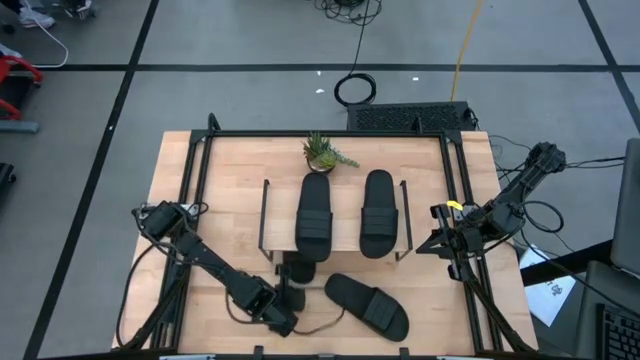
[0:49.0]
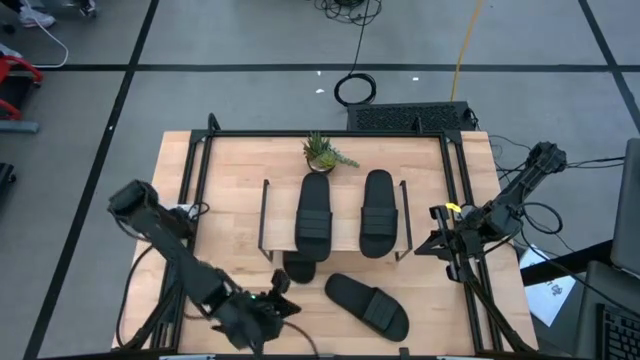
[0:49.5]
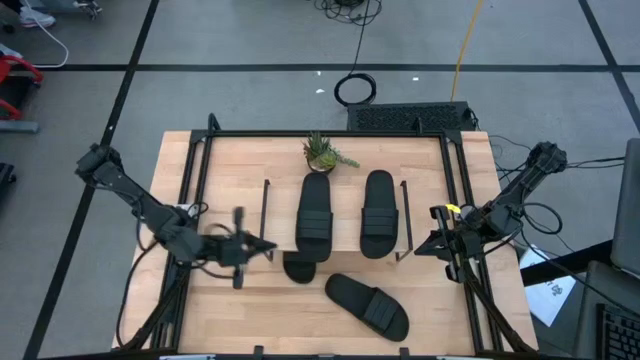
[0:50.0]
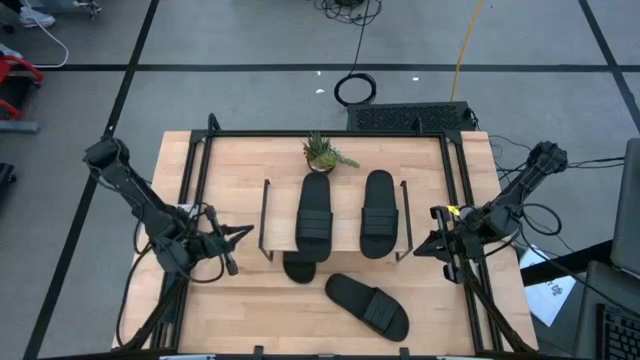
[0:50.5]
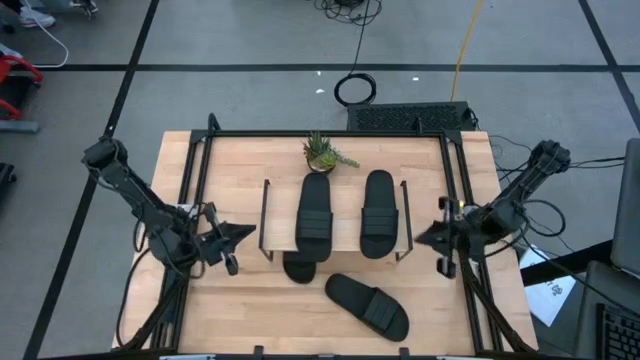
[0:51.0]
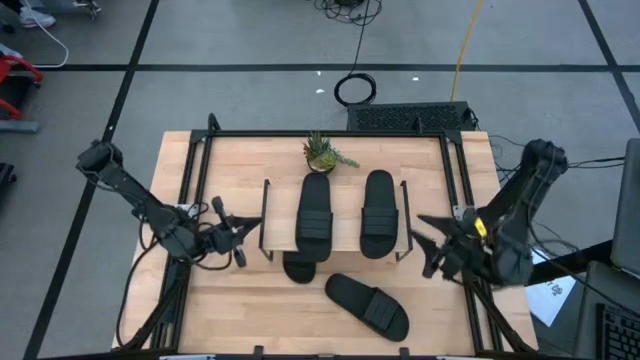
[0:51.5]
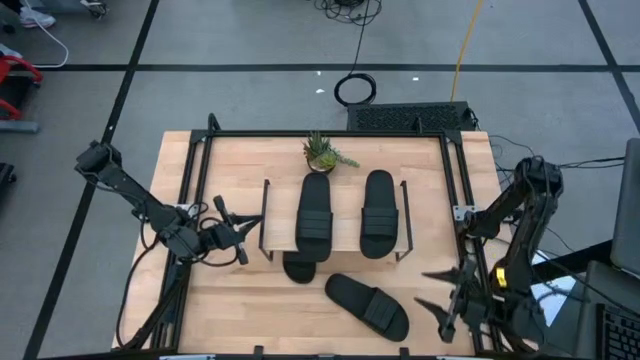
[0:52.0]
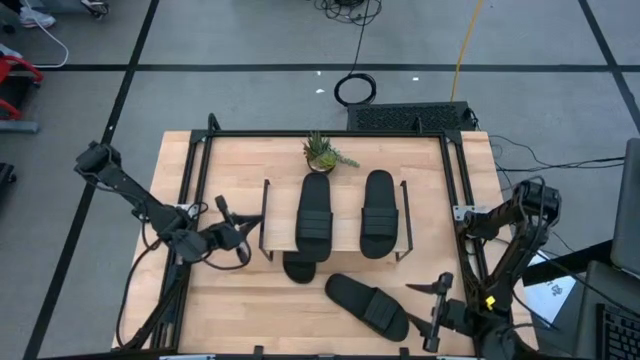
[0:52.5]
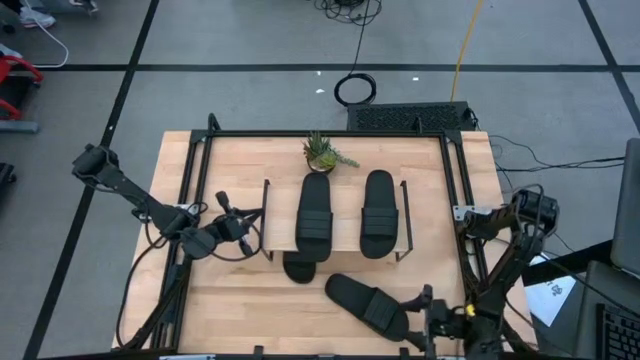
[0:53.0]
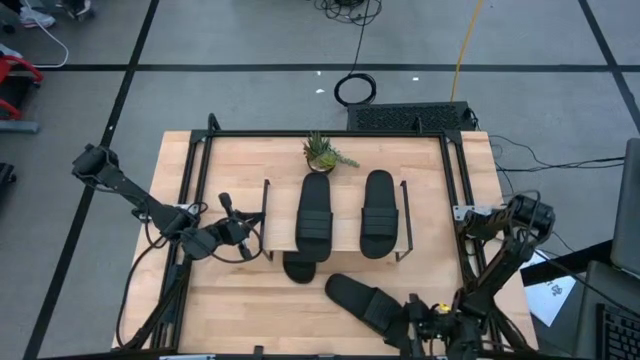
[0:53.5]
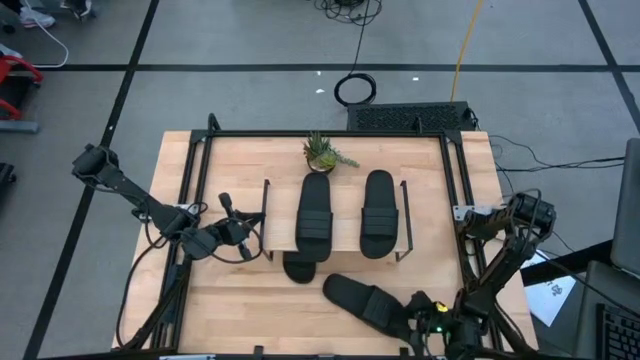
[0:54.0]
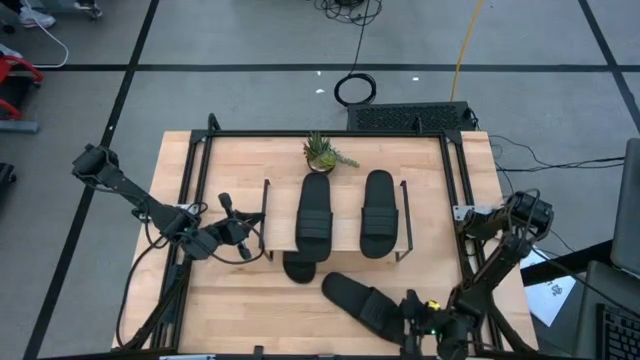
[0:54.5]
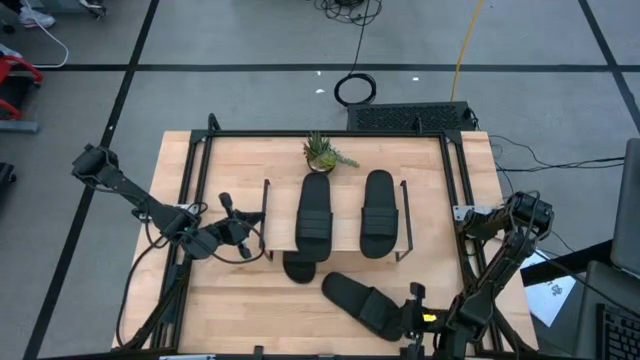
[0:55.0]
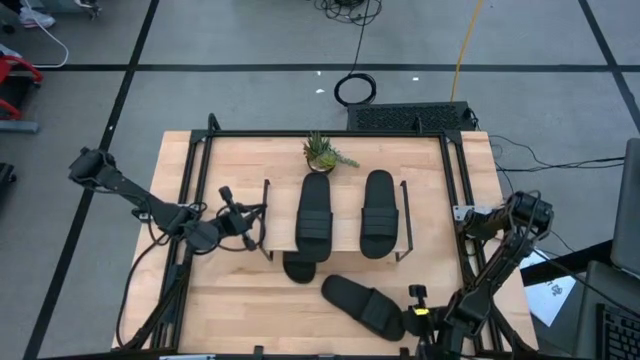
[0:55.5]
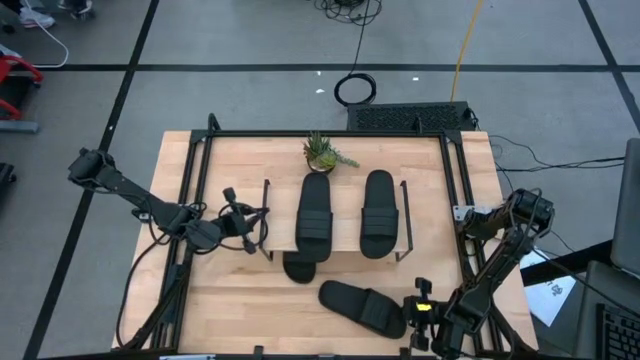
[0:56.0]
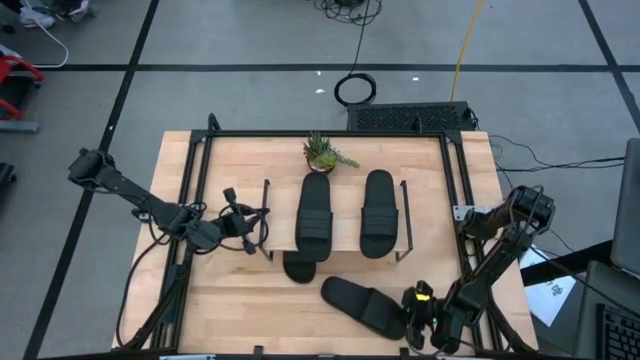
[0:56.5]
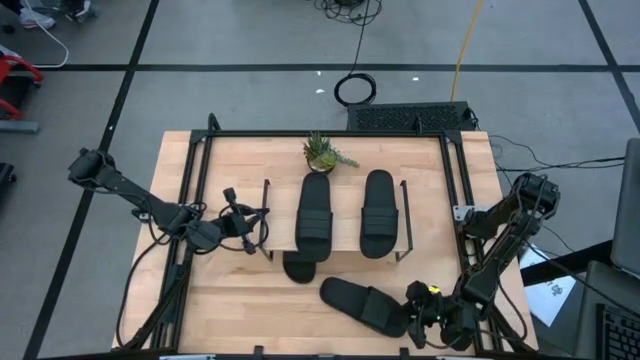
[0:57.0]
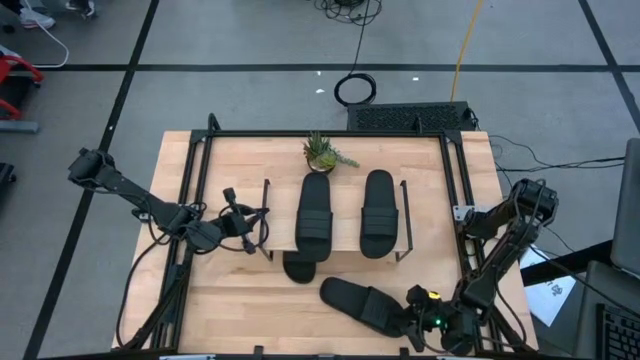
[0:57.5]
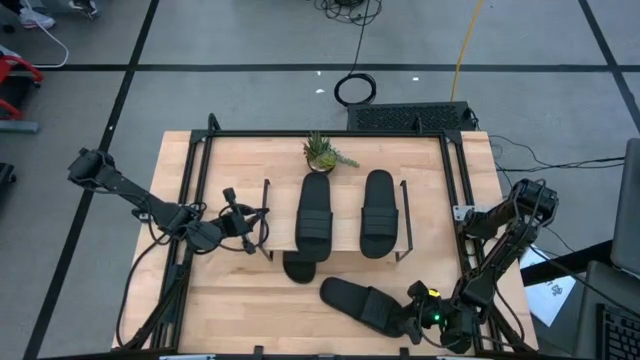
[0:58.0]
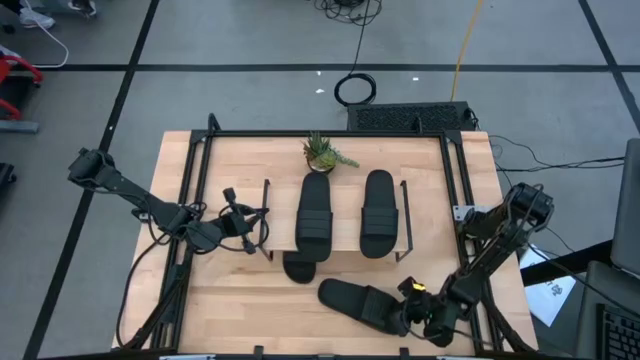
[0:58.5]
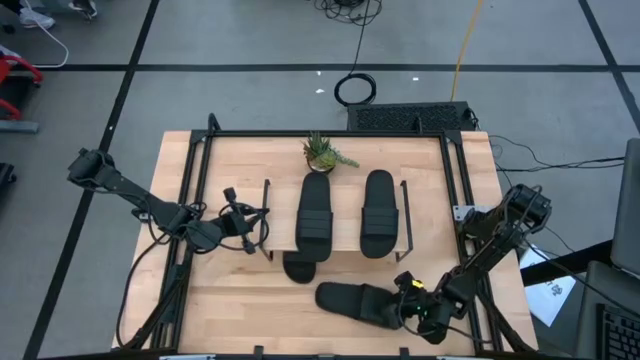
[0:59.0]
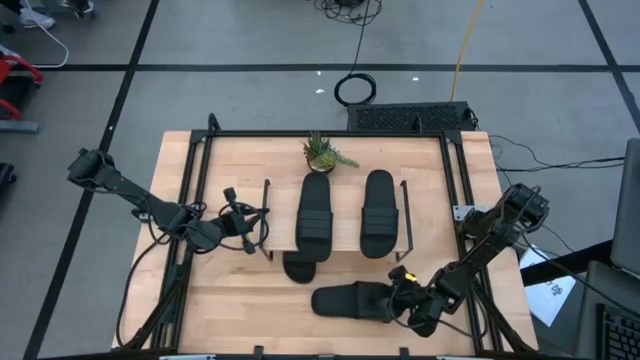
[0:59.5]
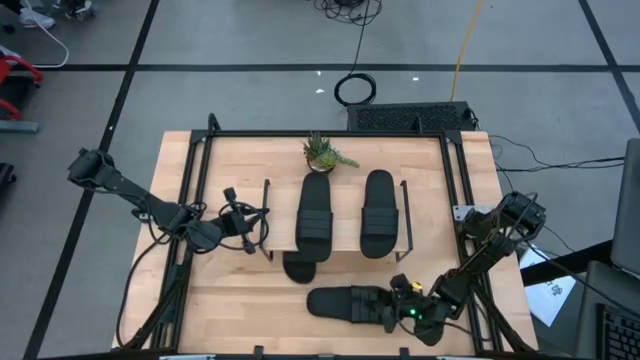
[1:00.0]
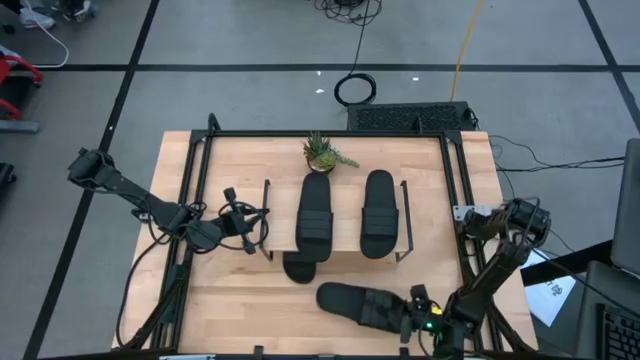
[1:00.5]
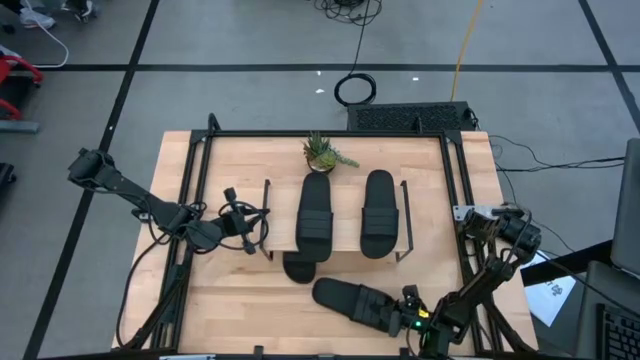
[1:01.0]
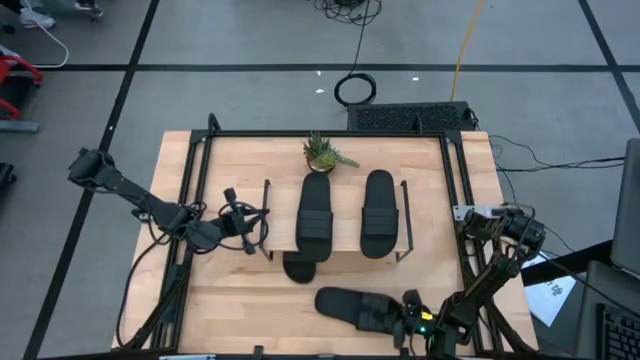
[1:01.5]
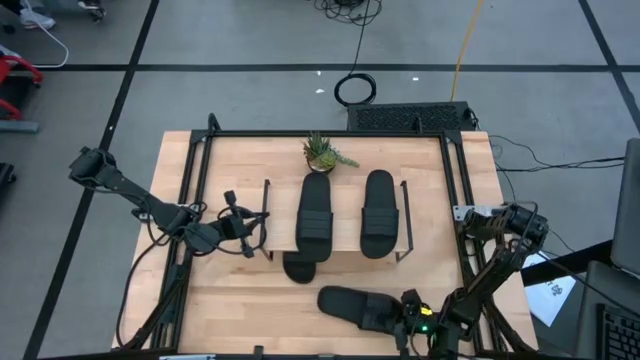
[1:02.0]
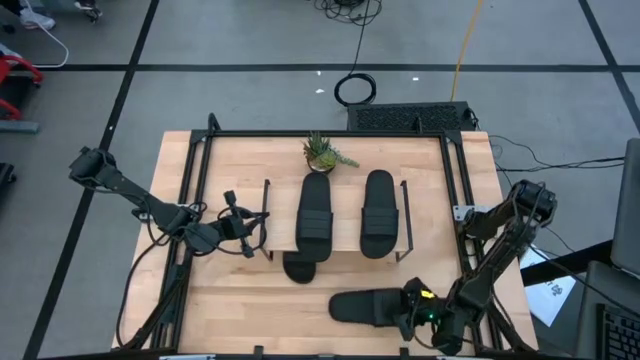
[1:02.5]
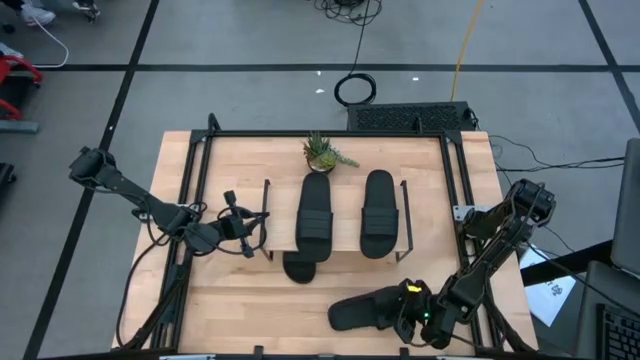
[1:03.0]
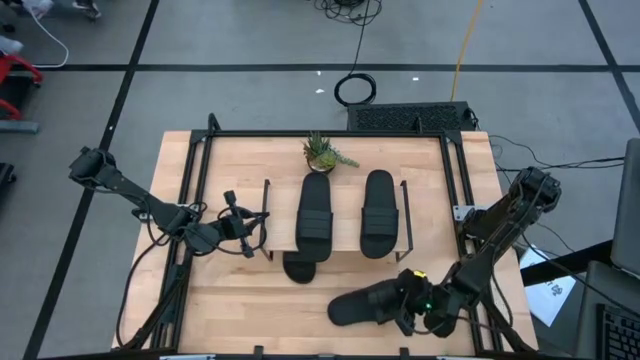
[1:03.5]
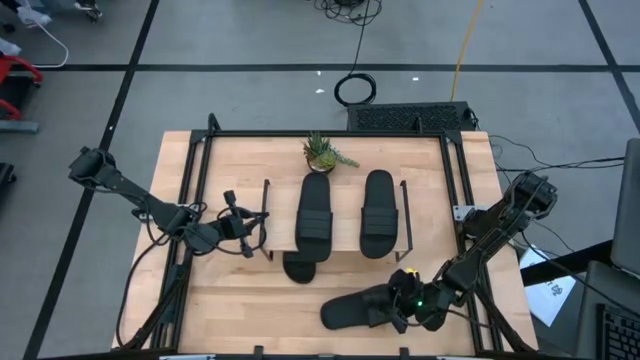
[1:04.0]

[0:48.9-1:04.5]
Task: Pick and place slides into the shelf
Put the black sandal under the shelf

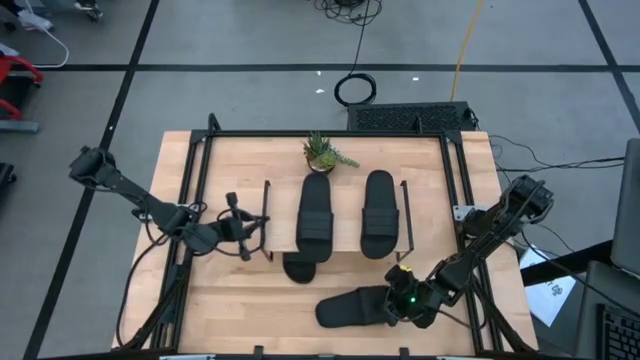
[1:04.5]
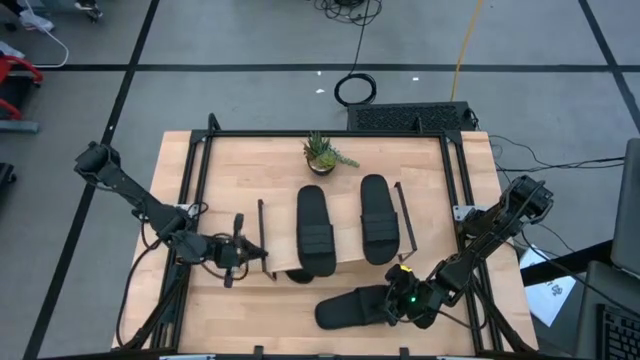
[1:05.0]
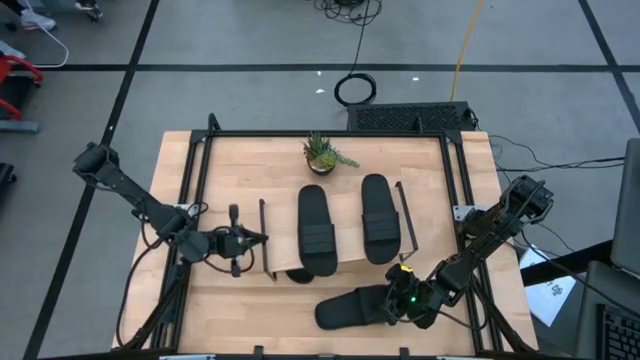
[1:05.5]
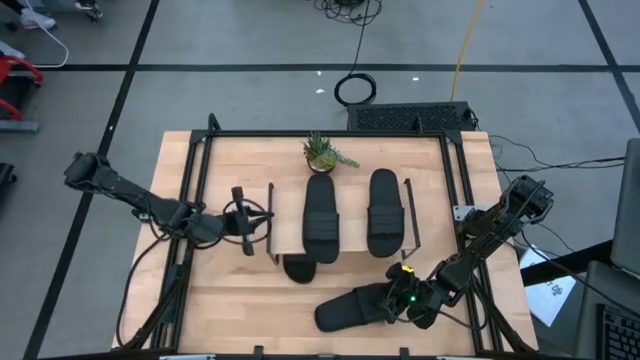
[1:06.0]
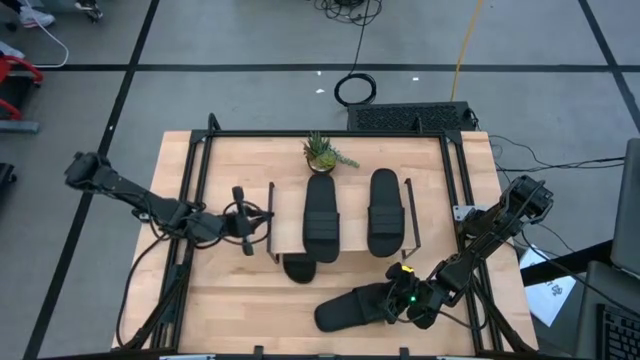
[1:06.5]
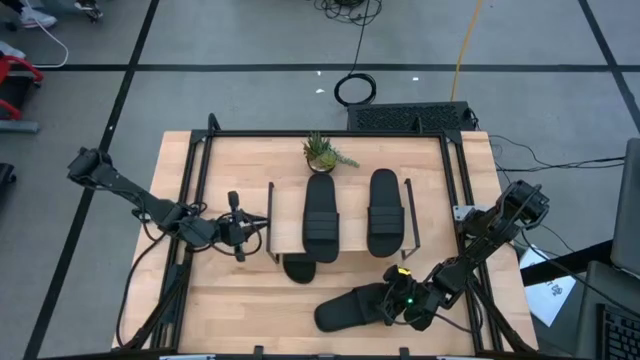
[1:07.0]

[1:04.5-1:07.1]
Adjust the shelf

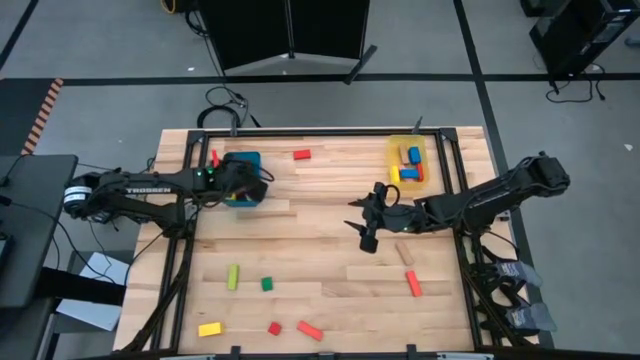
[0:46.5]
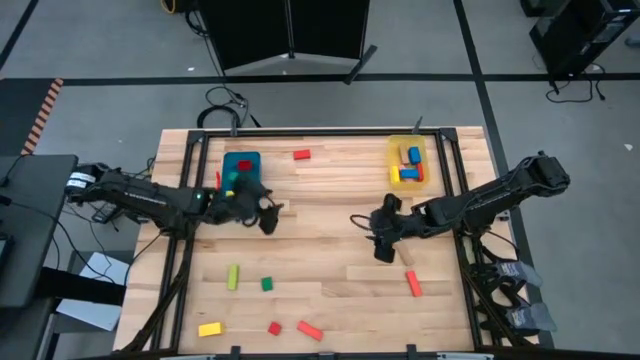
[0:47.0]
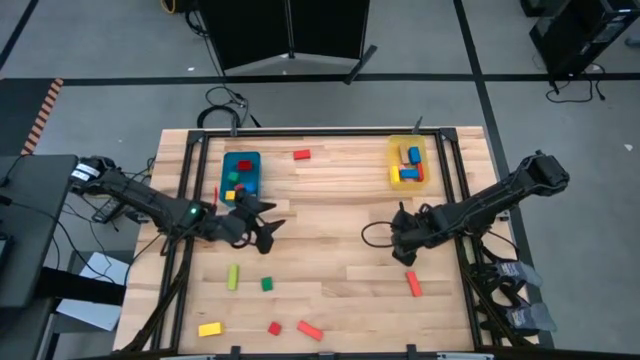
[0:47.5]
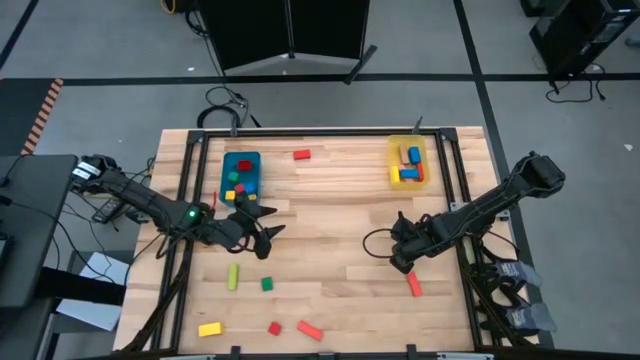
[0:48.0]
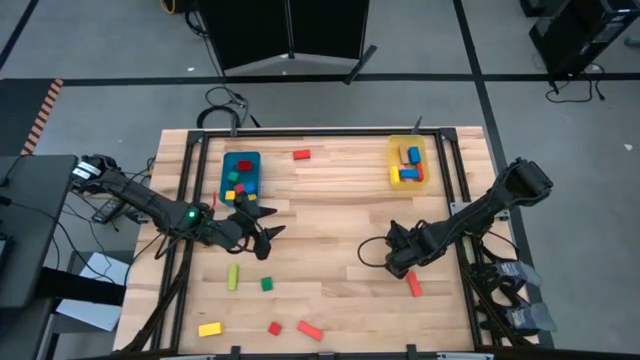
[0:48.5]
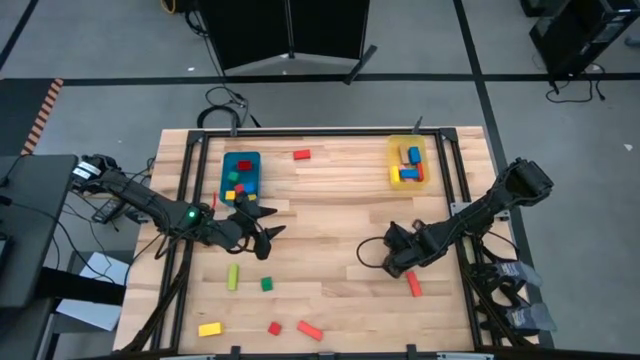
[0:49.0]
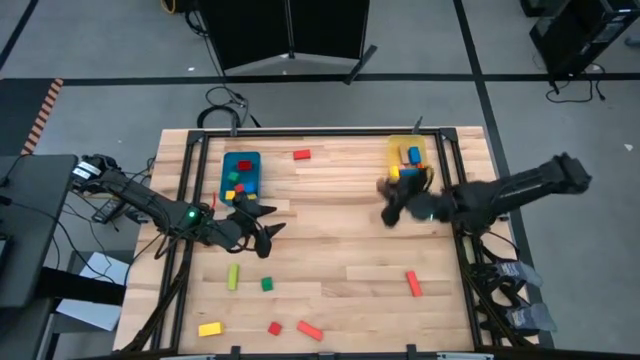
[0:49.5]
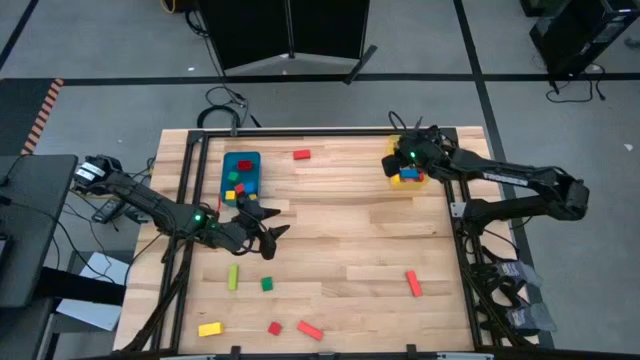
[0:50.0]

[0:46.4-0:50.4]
Task: Sort blocks by size
Put the large light brown block into the yellow bin
